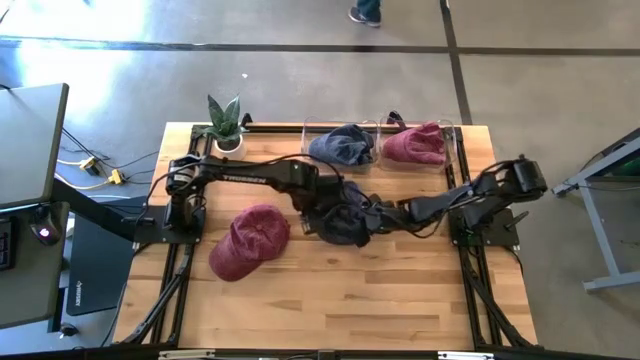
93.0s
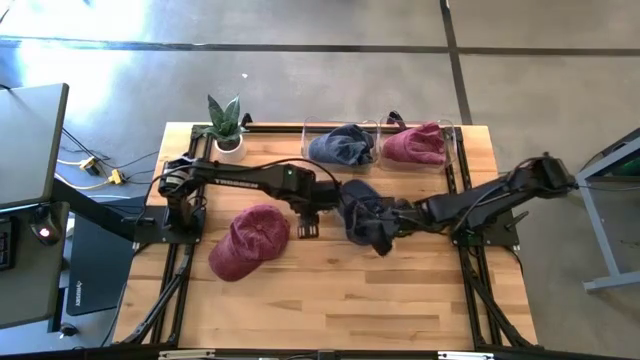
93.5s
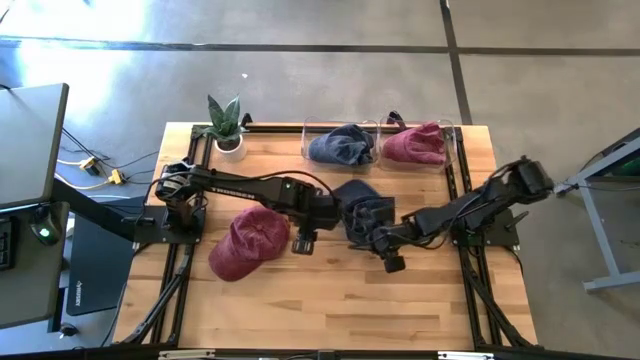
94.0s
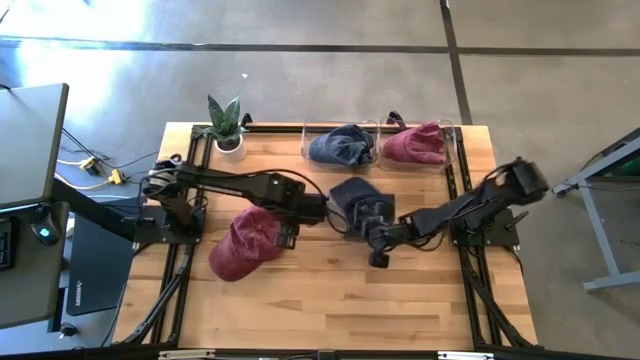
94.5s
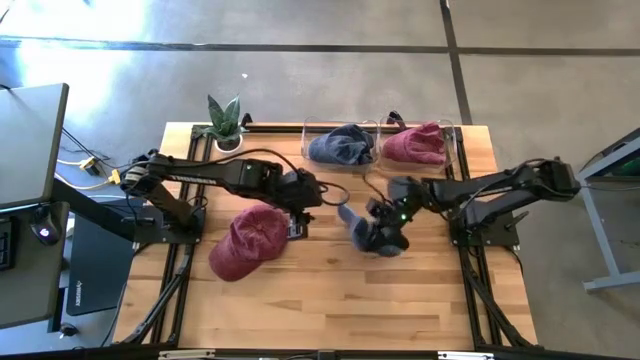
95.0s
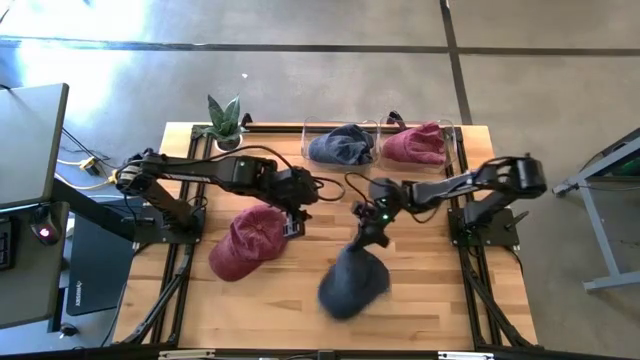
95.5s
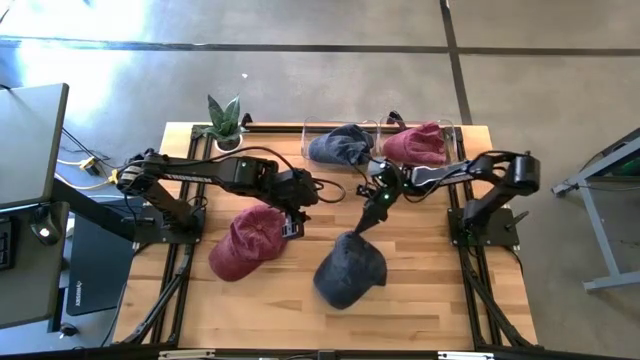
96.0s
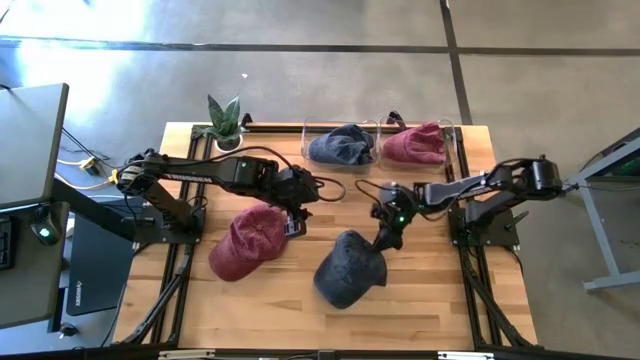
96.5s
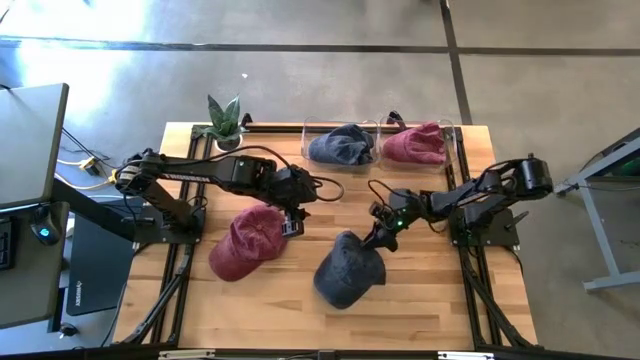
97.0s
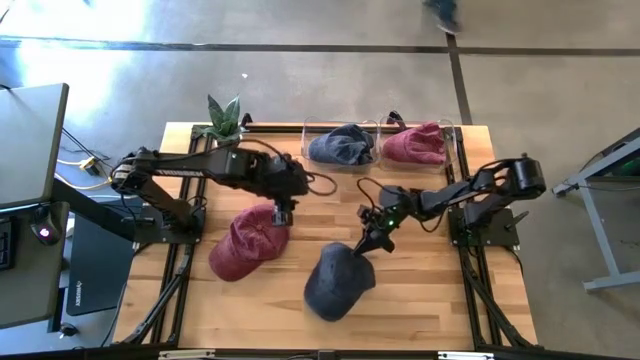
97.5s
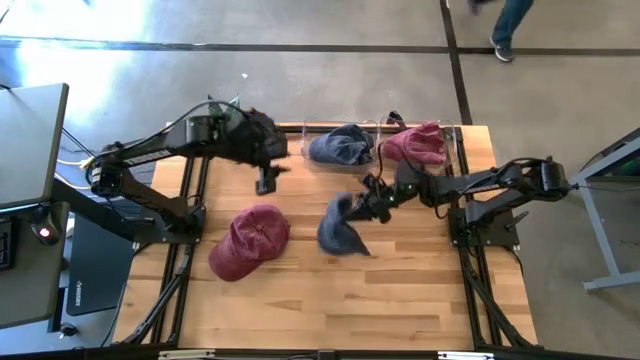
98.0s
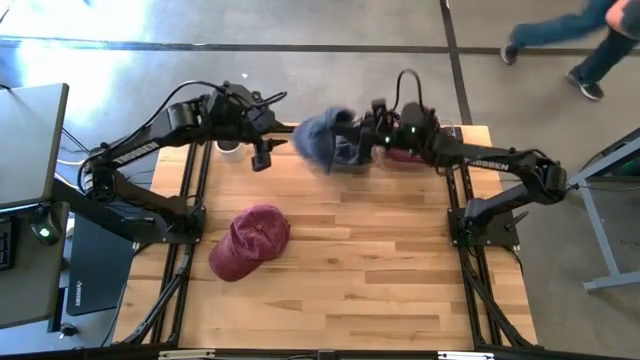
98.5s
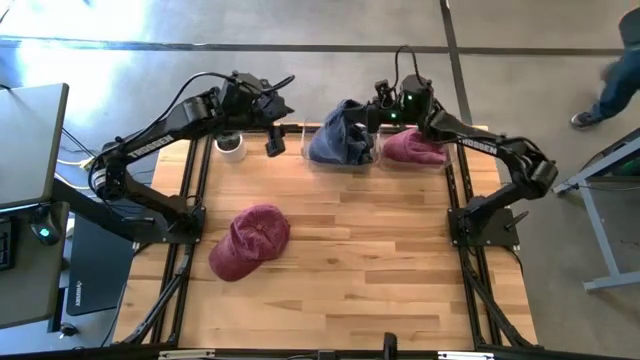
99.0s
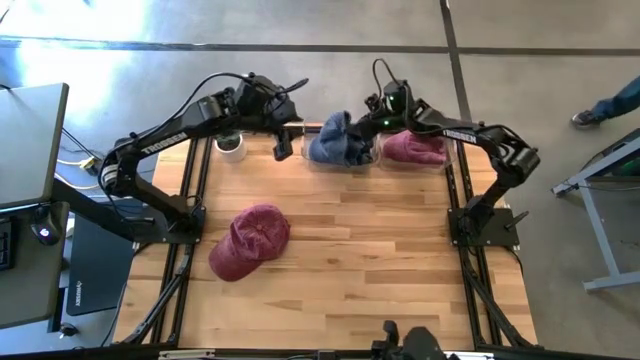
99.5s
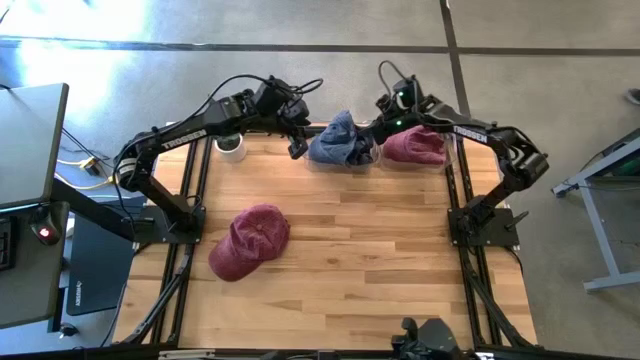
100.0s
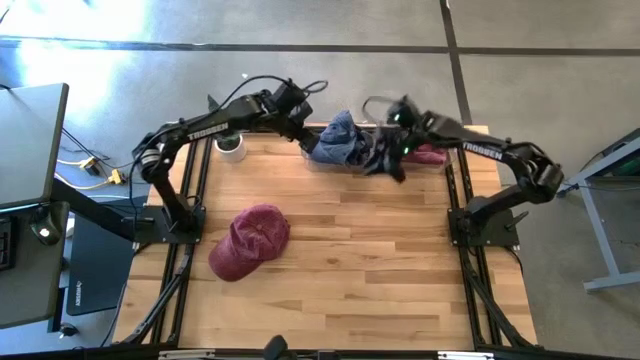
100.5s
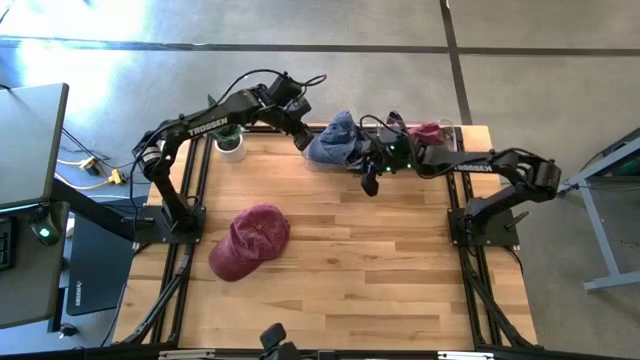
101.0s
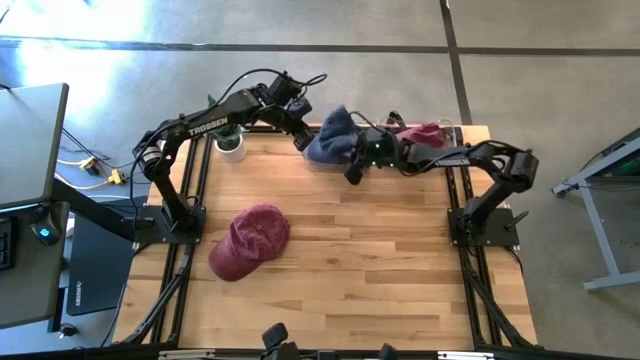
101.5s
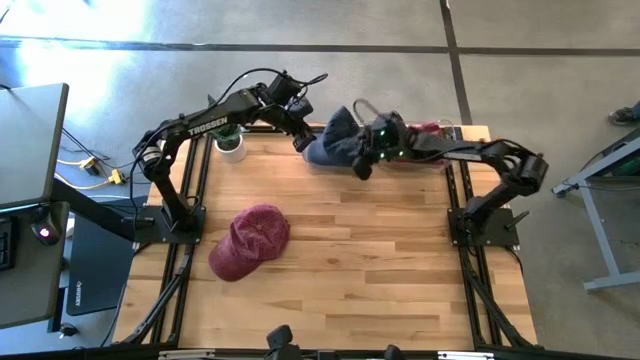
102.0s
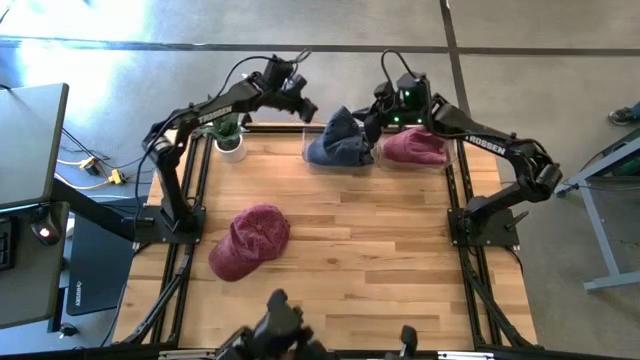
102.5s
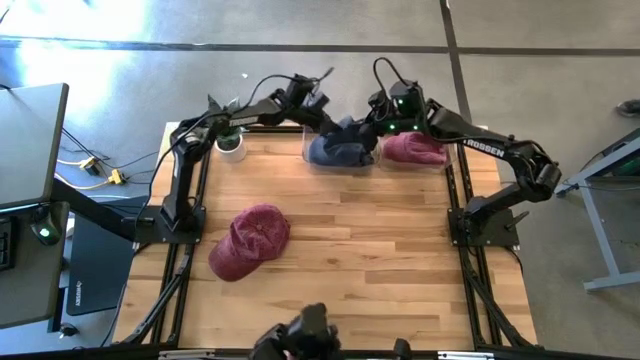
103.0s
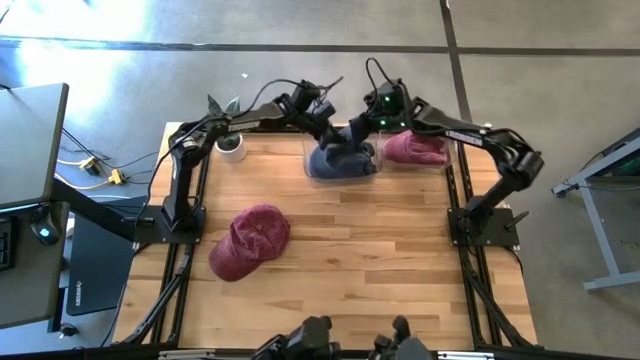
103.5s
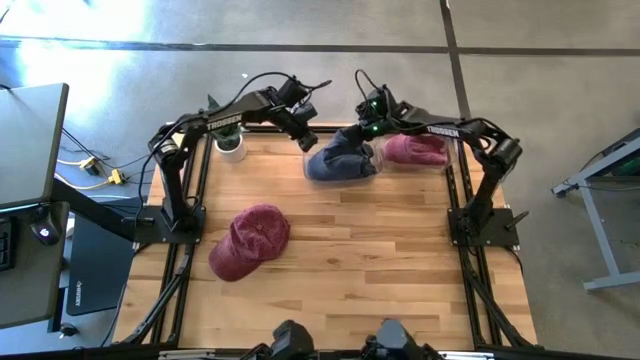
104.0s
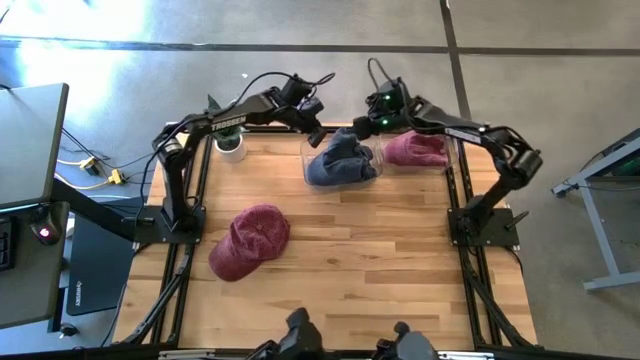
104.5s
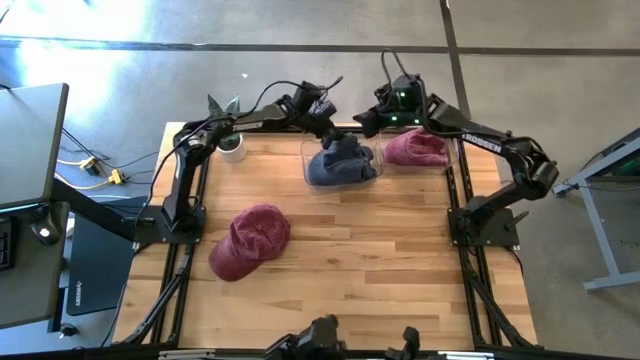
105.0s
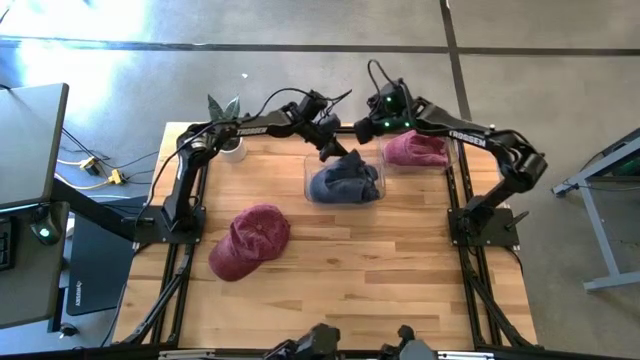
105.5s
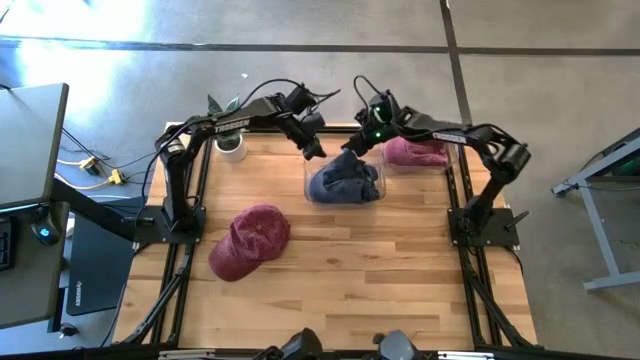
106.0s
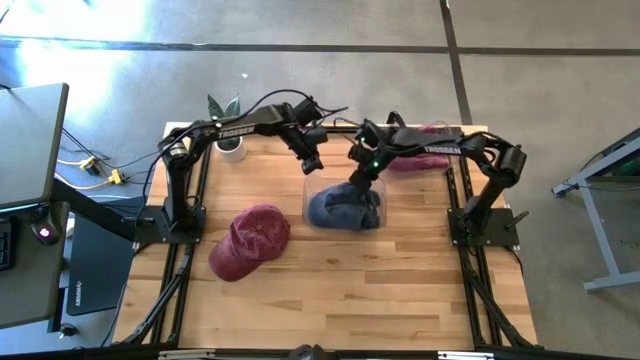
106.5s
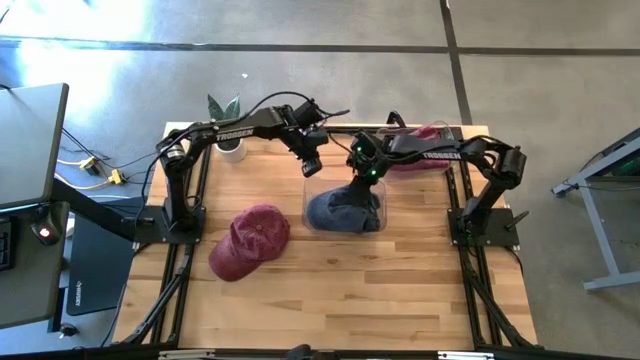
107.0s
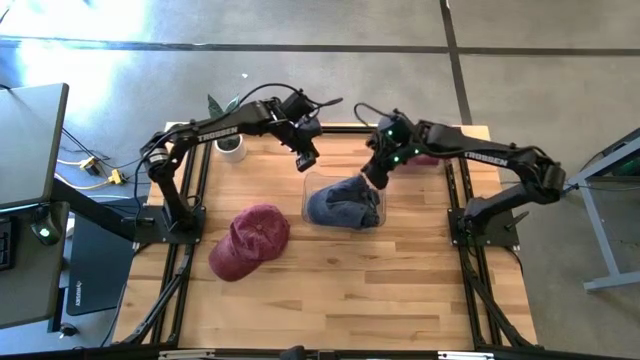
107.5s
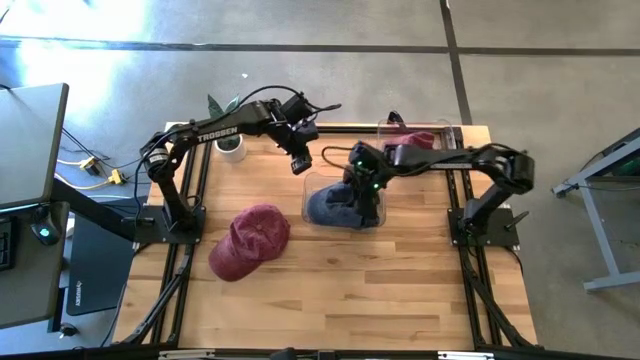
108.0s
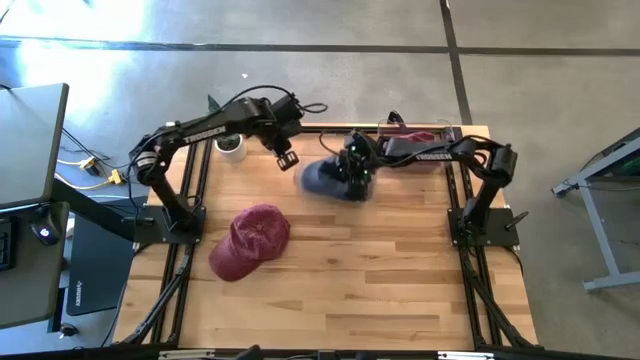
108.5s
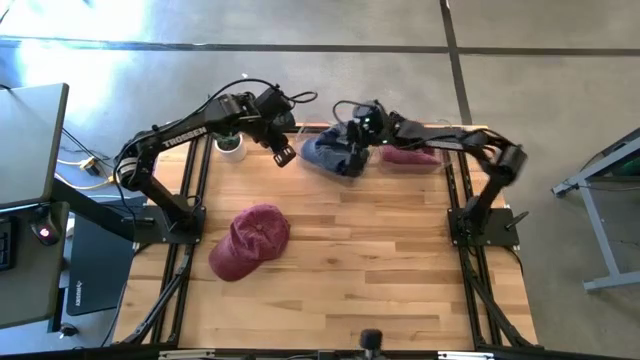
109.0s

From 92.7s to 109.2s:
Task: Pick & Place hat
Put the dark blue cap into the left transparent bin

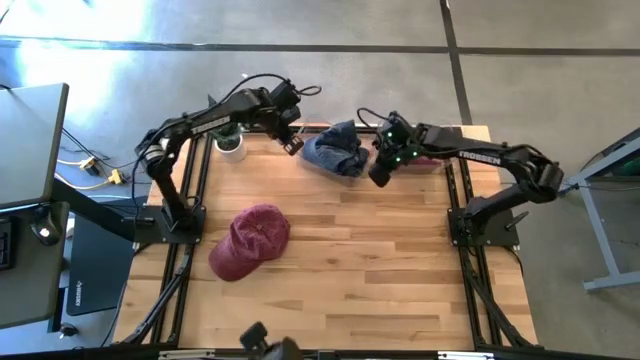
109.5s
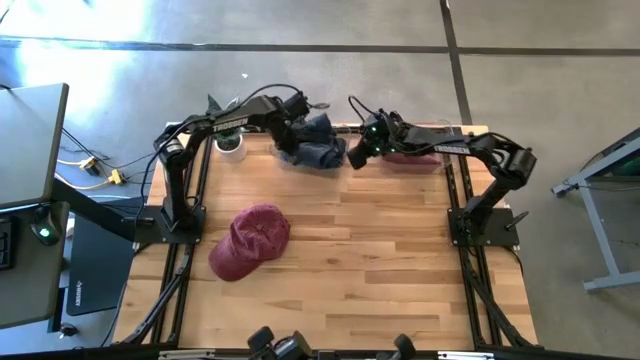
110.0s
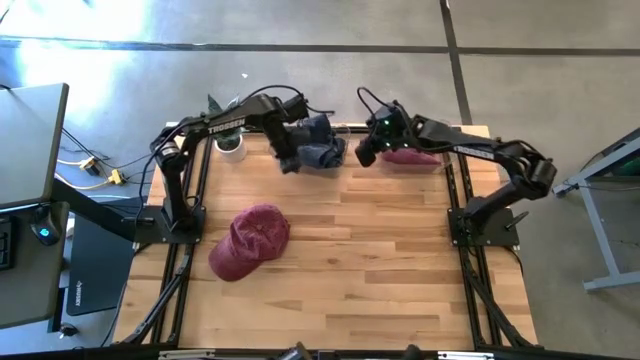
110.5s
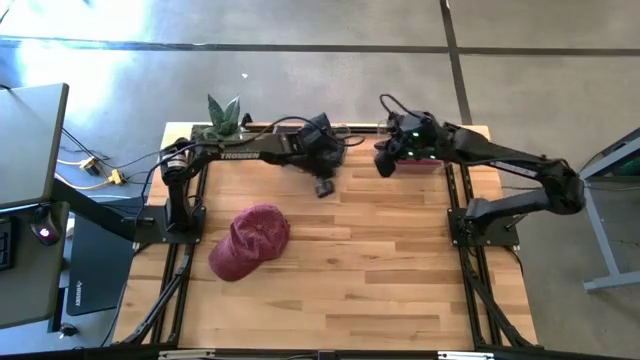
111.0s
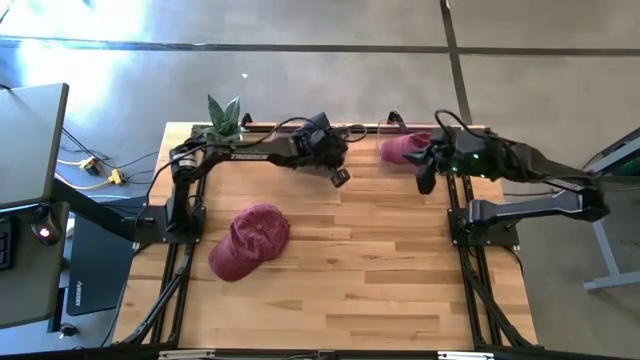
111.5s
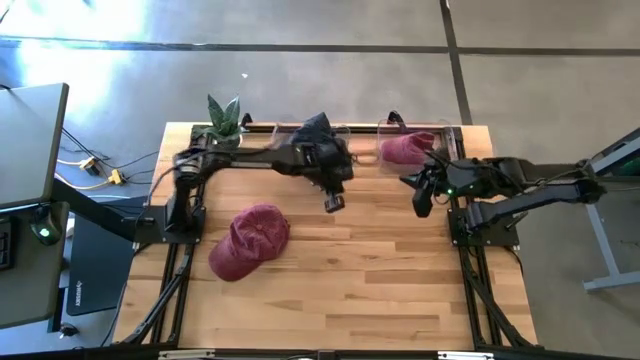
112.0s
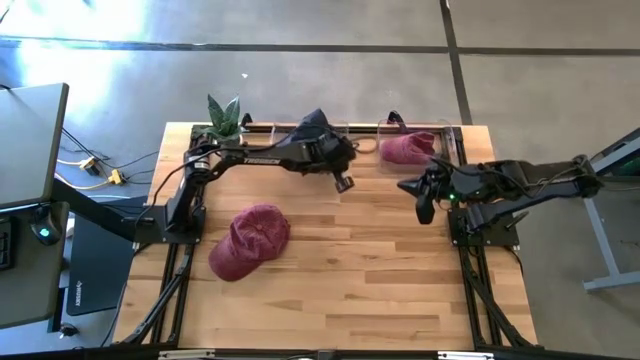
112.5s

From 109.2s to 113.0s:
Adjust the left transparent bin

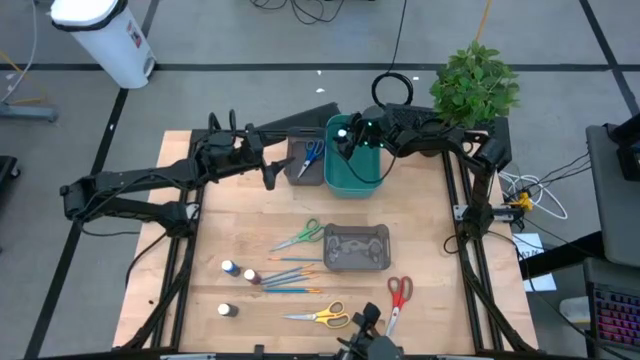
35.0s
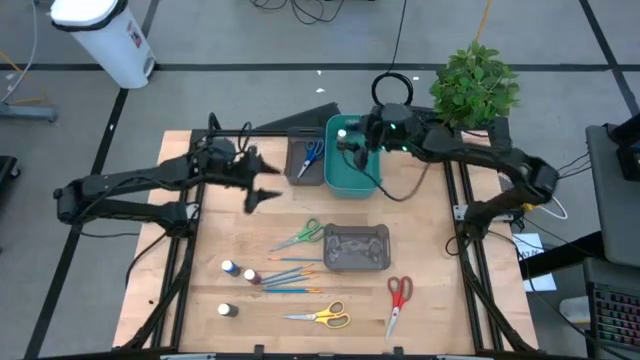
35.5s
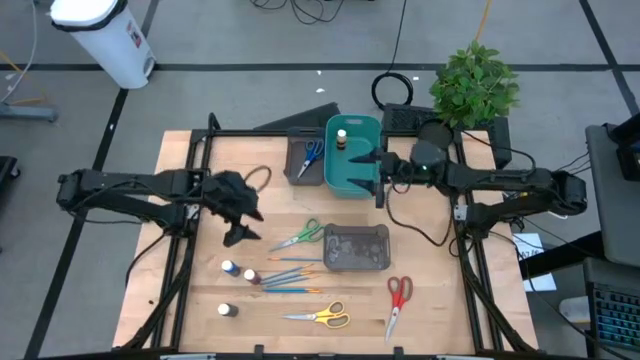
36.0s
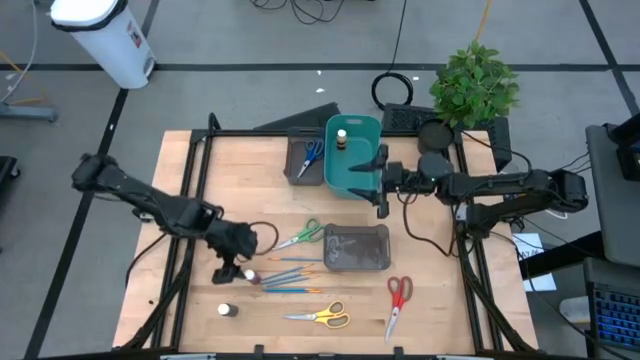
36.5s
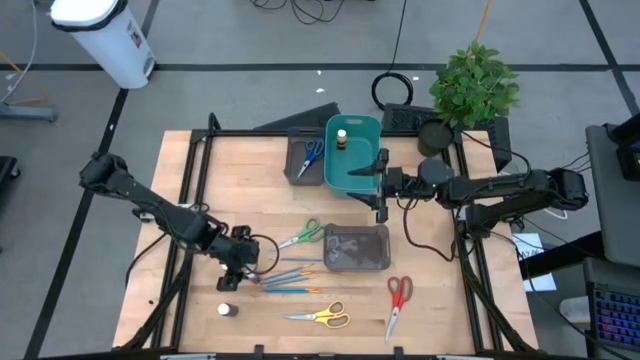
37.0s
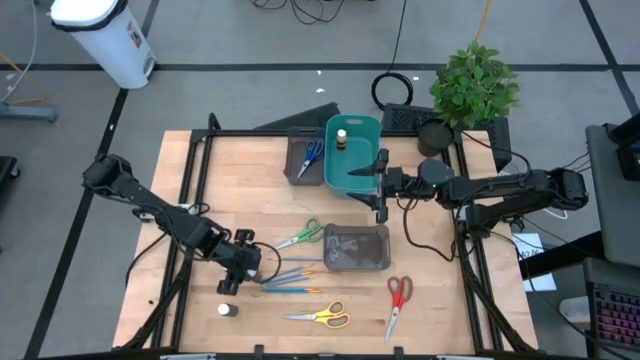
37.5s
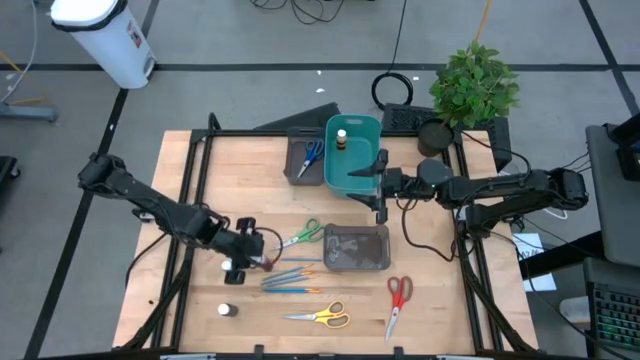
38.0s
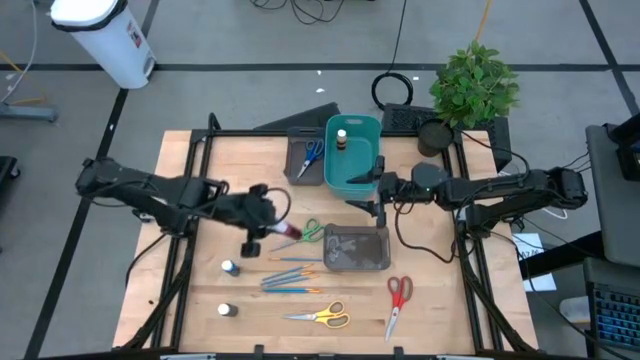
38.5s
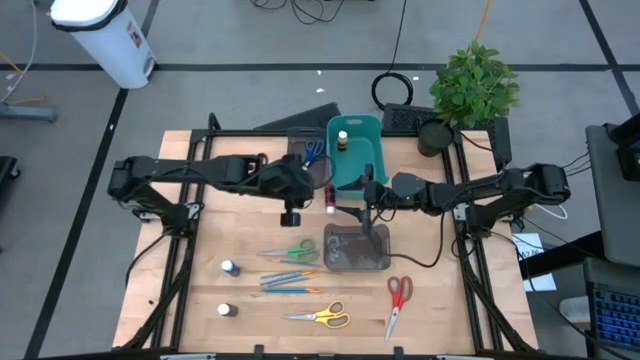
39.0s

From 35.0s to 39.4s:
Task: Pick & Place Paint Supplies
Put the pink paint bottle into the green bin
